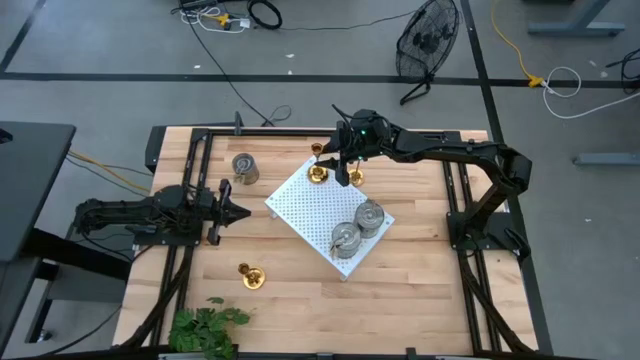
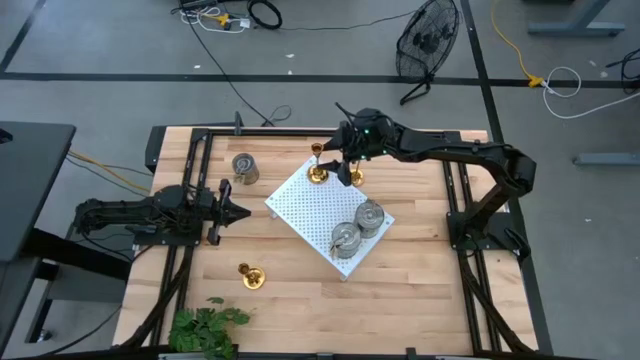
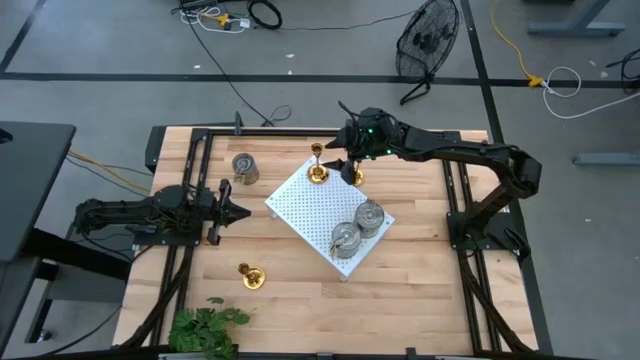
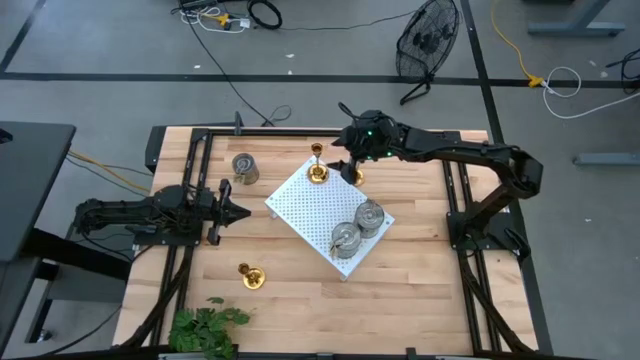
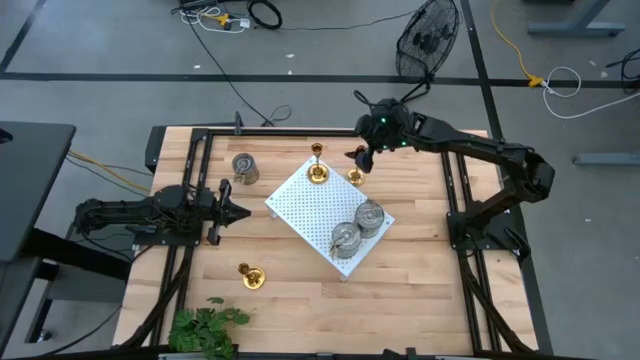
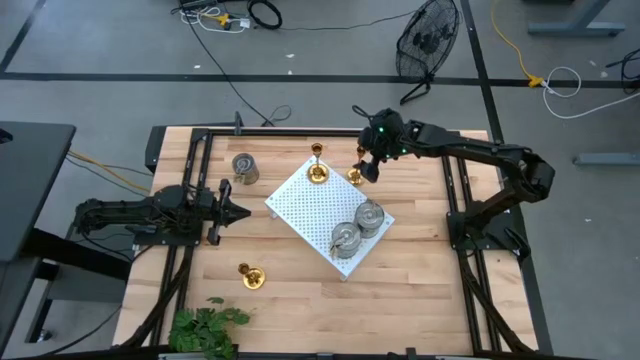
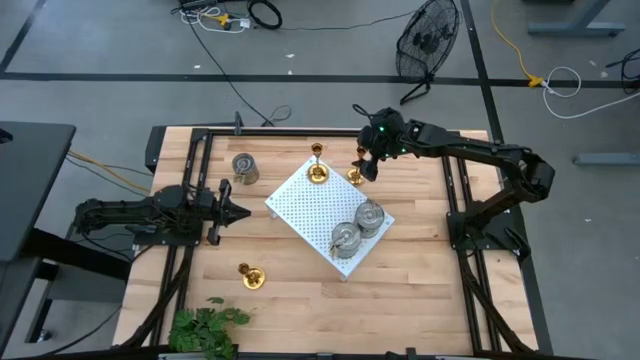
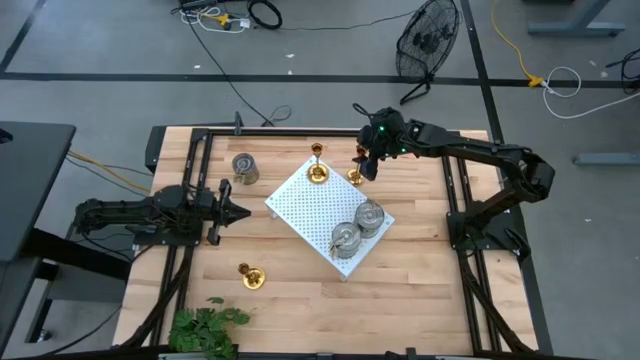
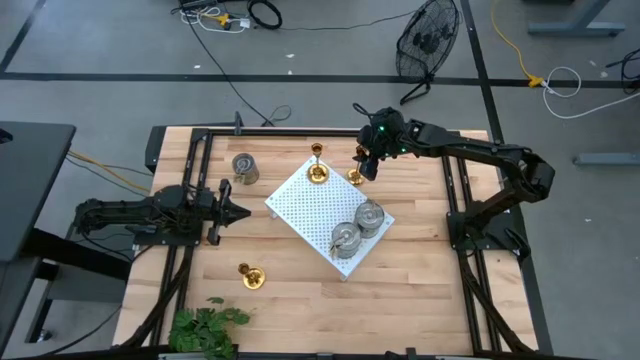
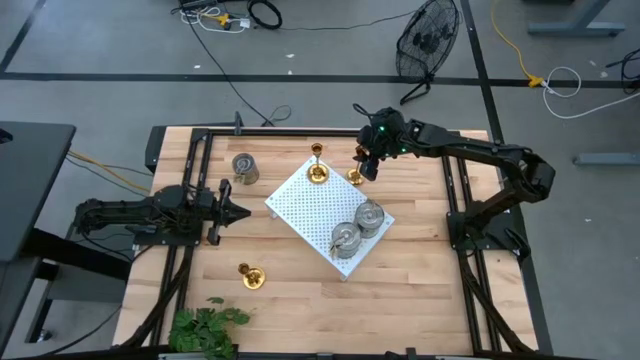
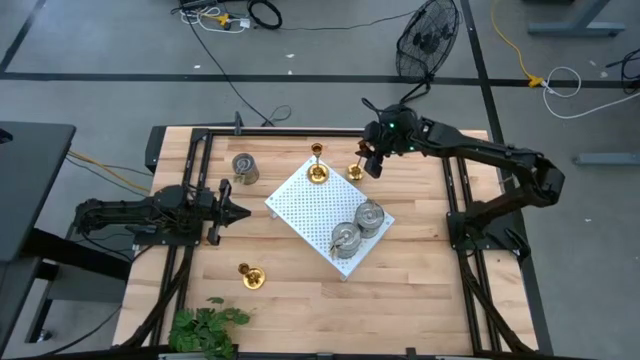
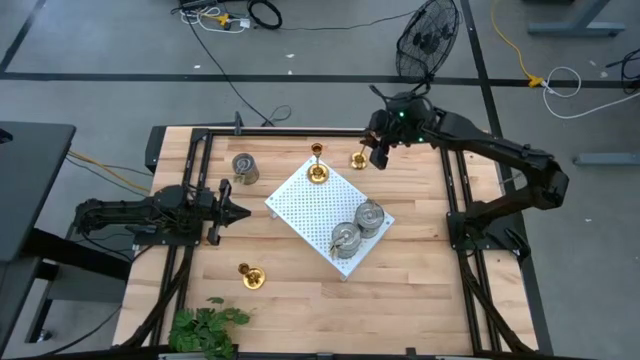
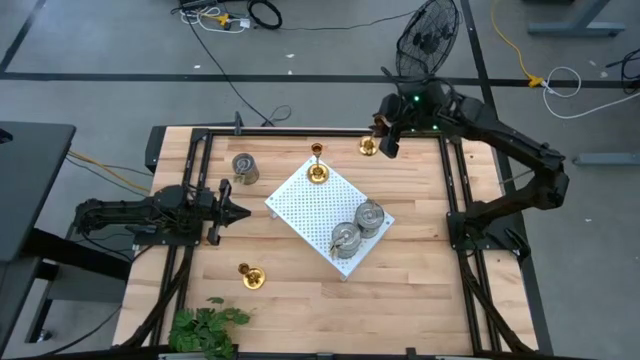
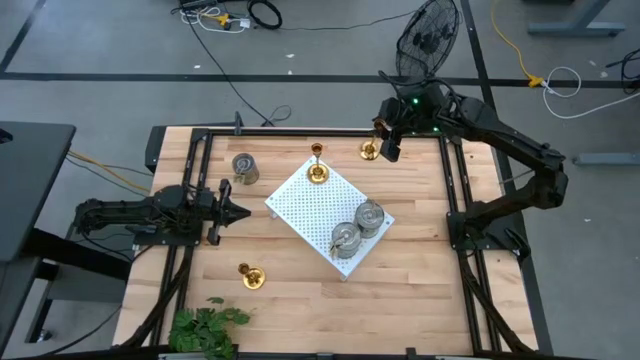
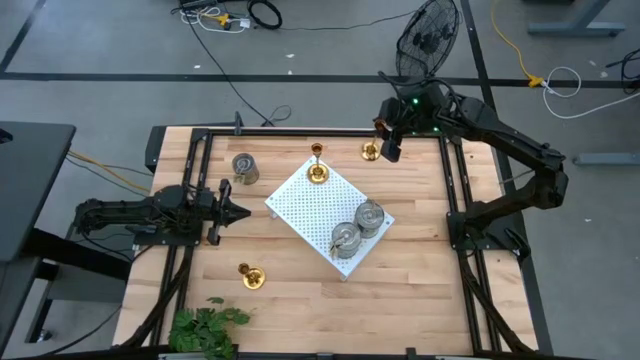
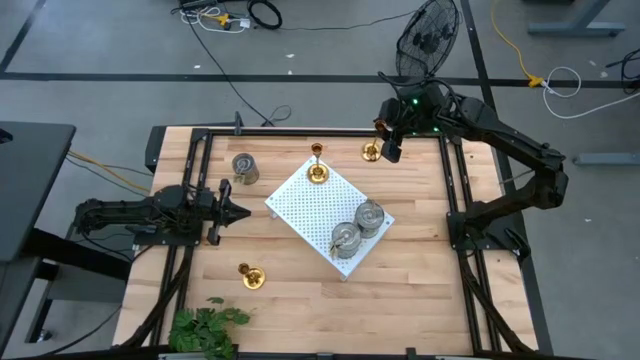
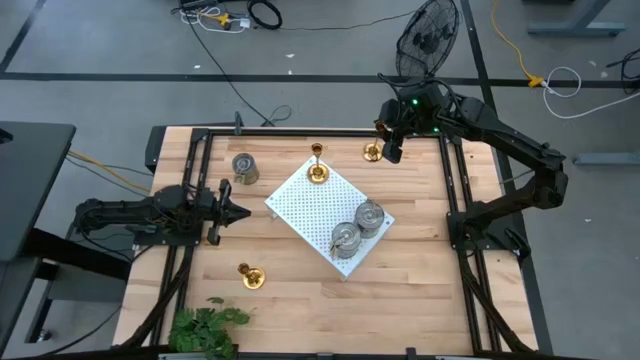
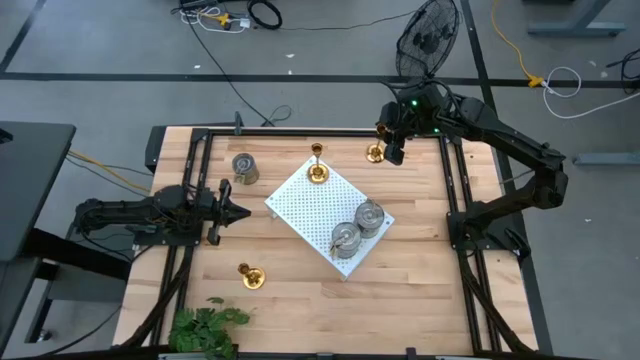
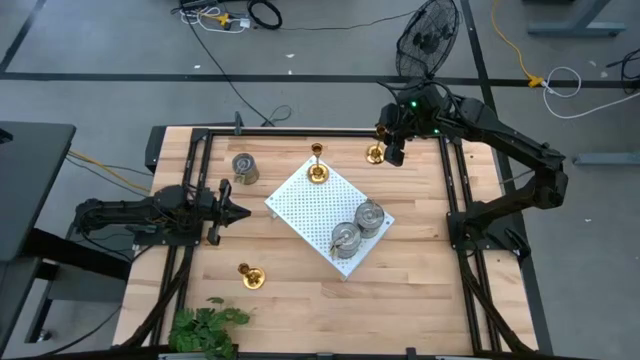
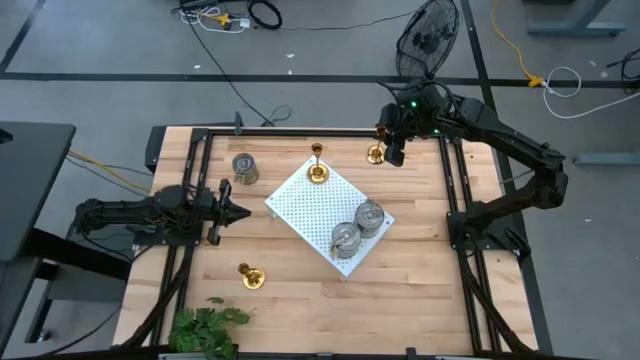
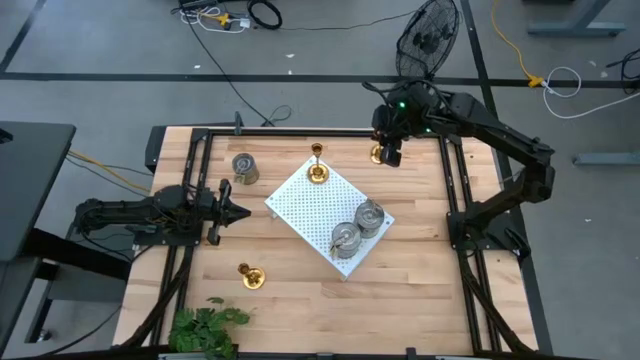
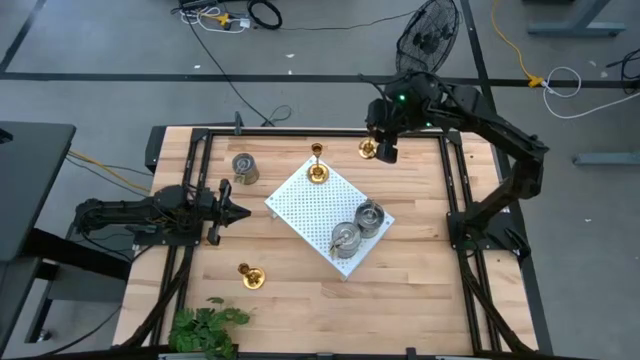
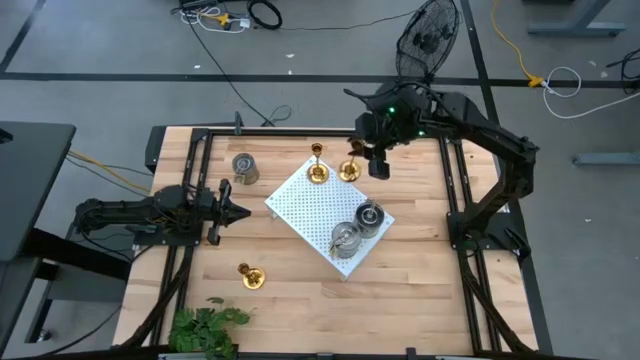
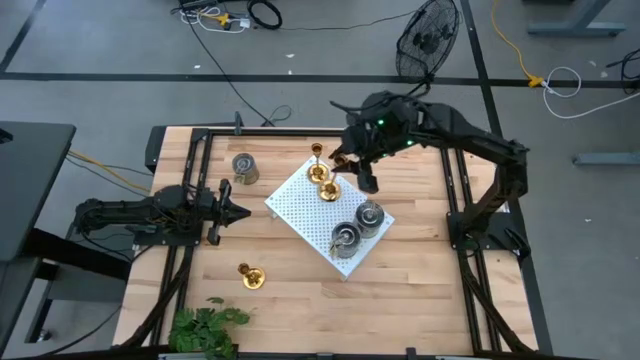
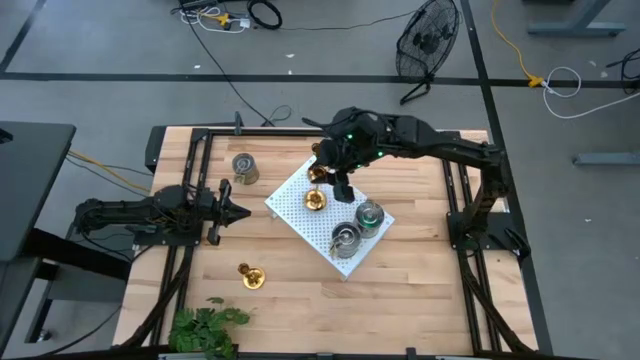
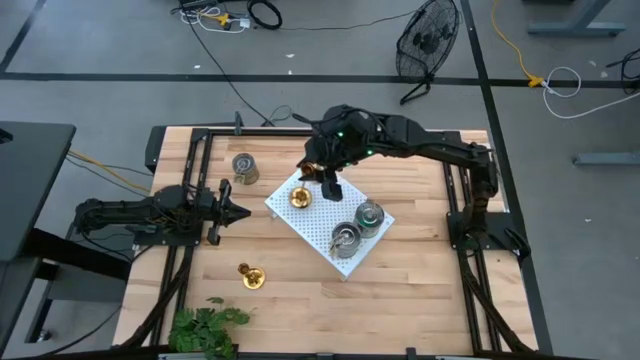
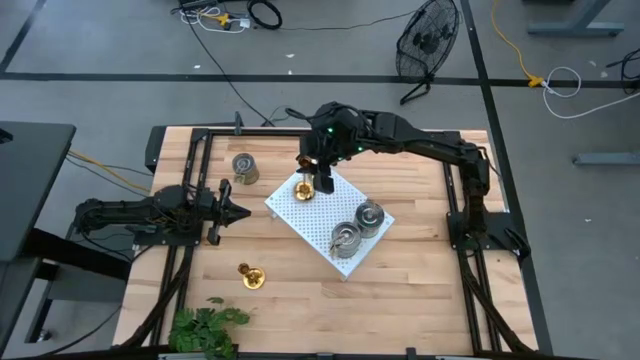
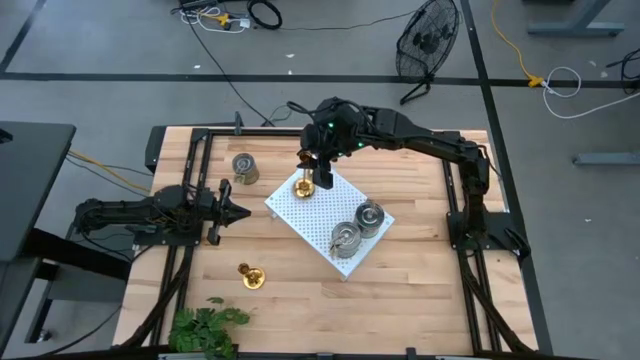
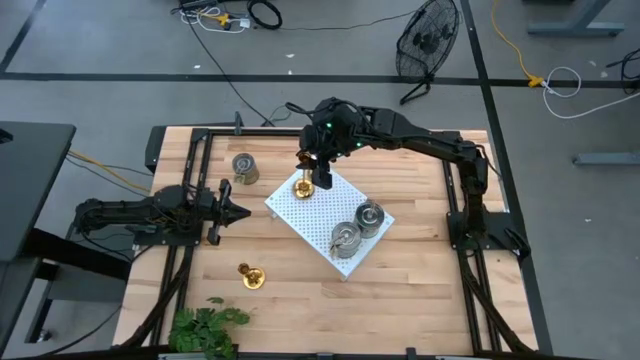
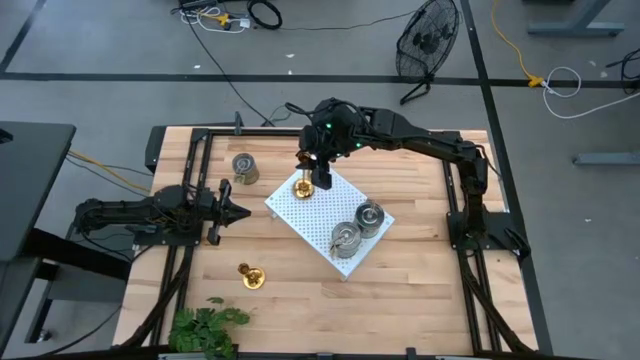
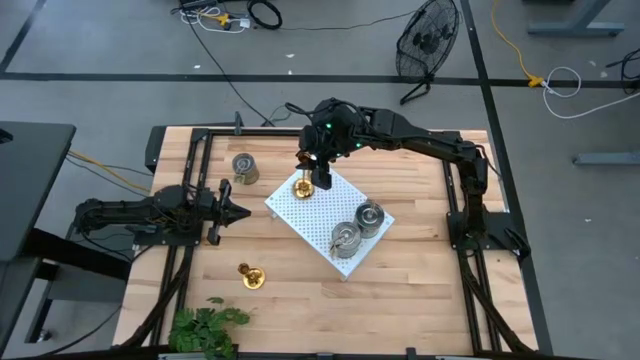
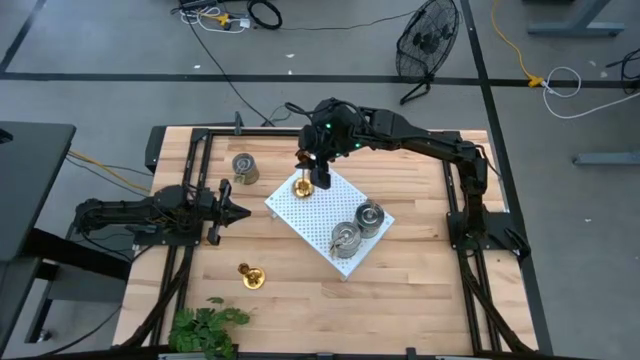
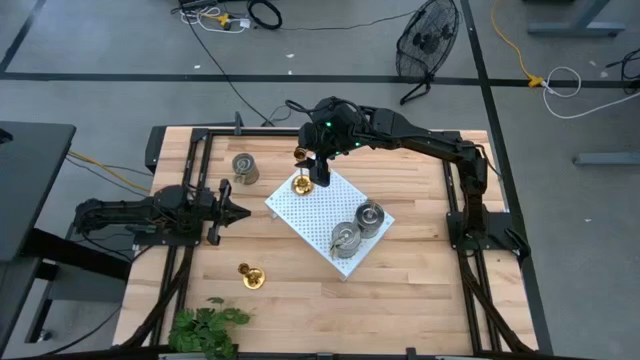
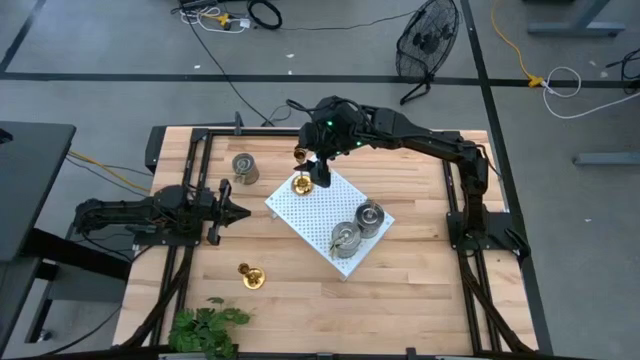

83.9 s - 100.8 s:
Task: Pick & Place candle stick holders
Put the top right gold candle holder on the shelf align with the other gold metal candle holder

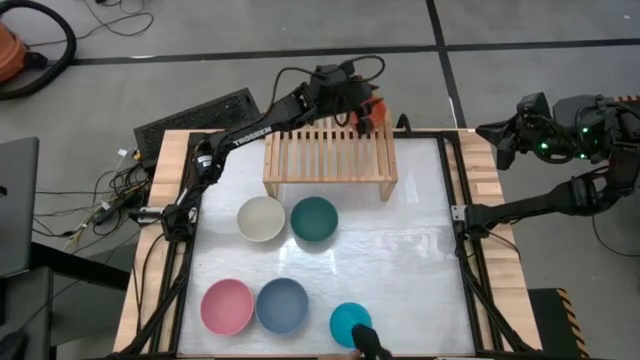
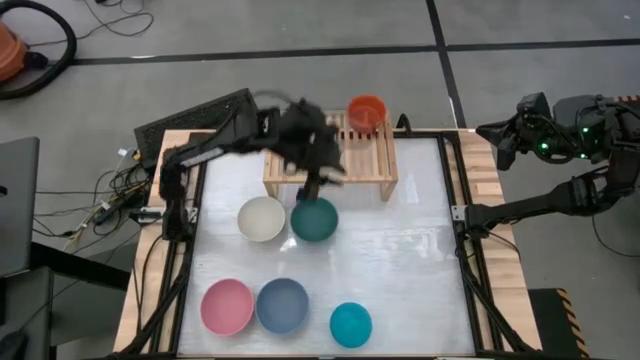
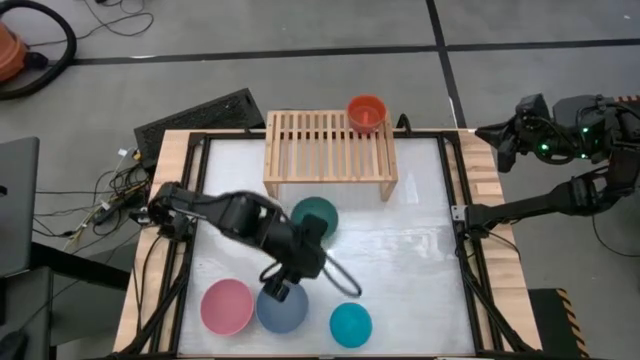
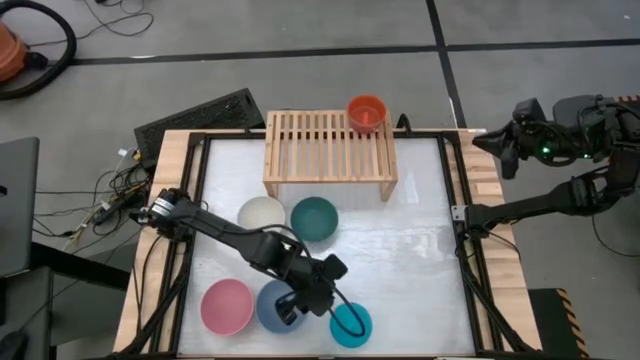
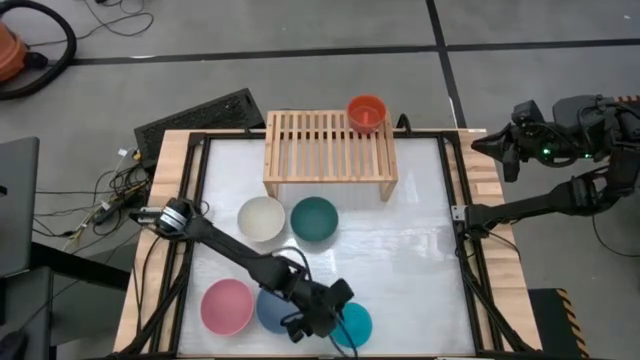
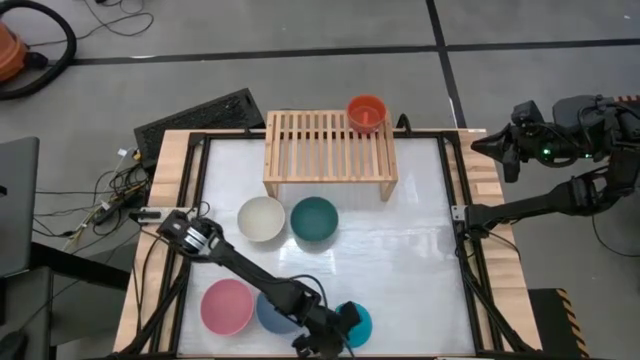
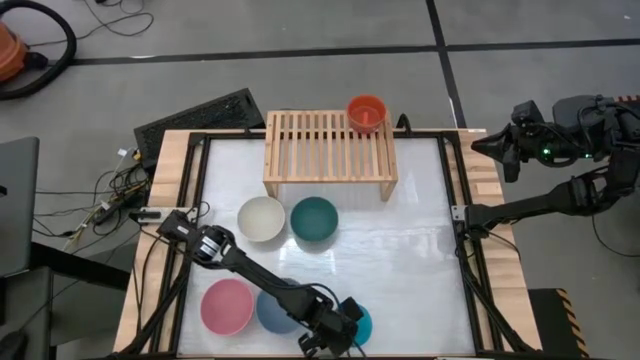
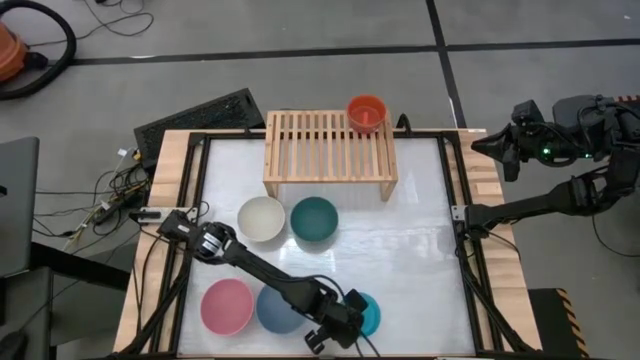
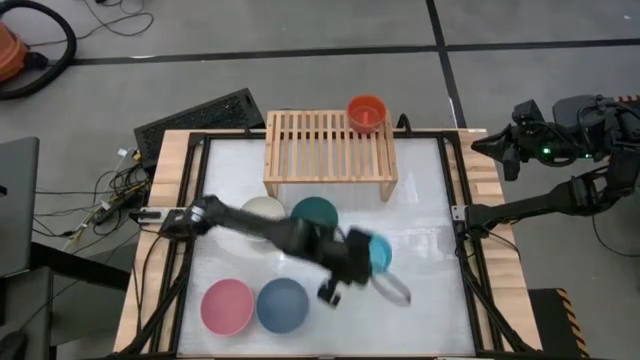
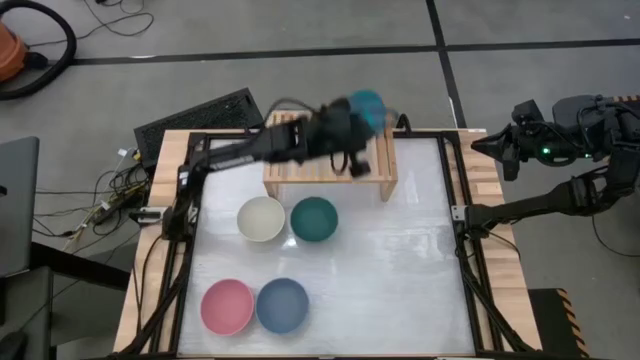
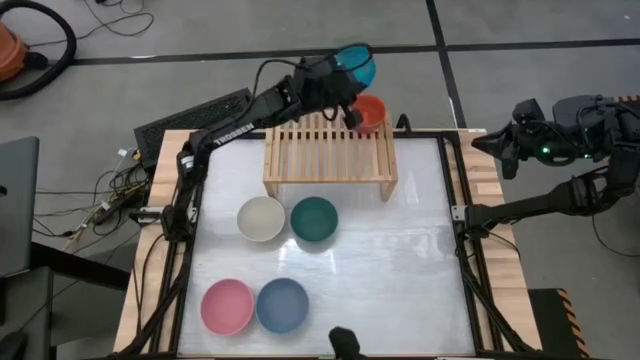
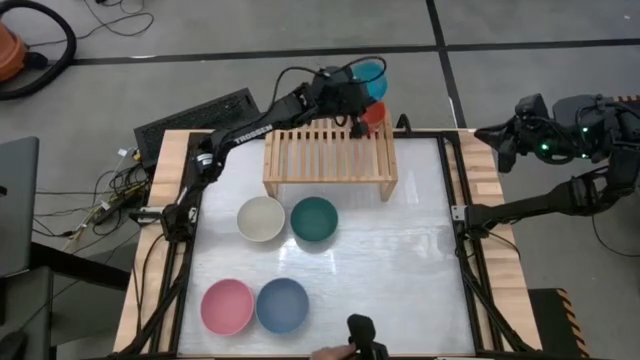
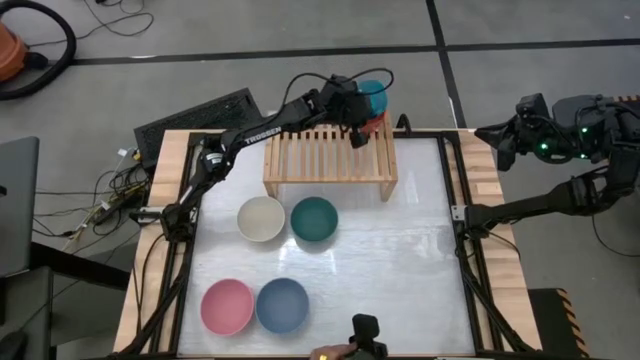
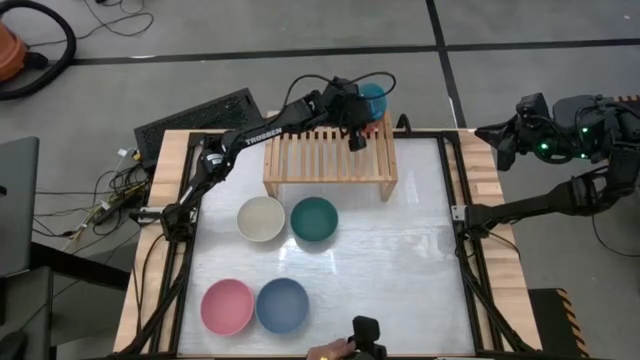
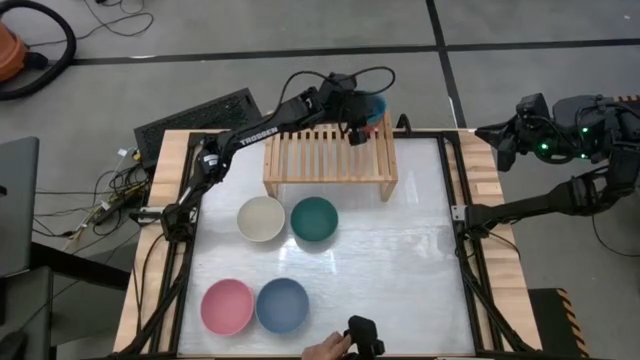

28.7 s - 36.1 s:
Task: Place and stack bowls onto a shelf
Stack the small blue bowl on top of the small orange bowl
